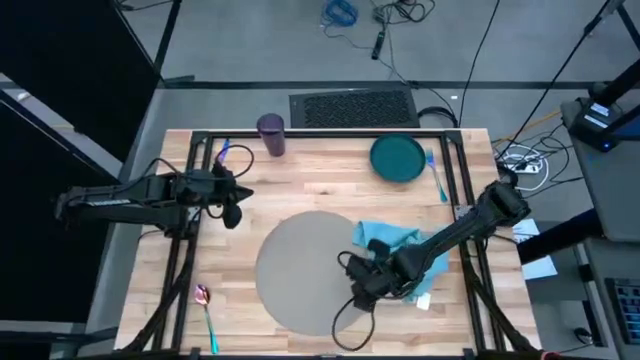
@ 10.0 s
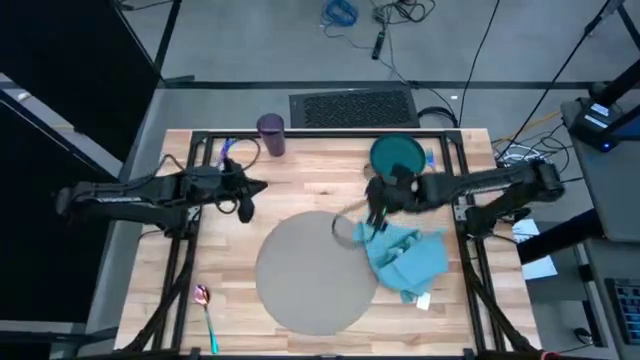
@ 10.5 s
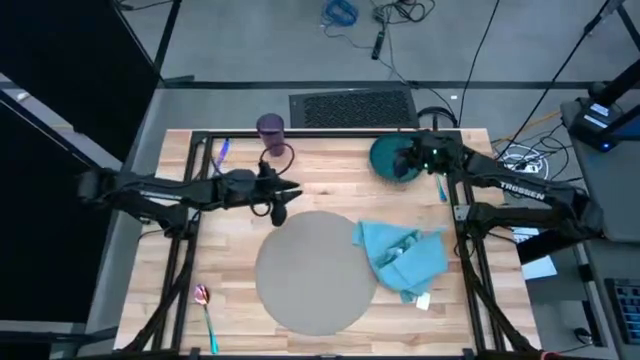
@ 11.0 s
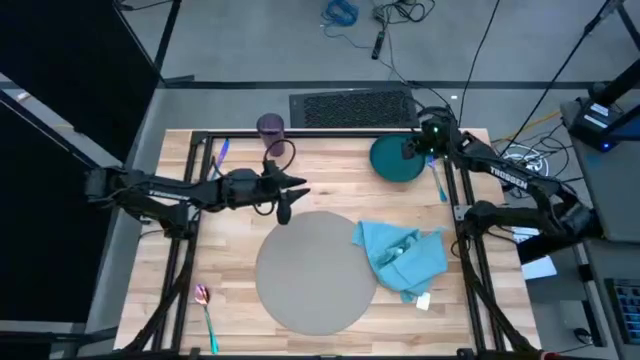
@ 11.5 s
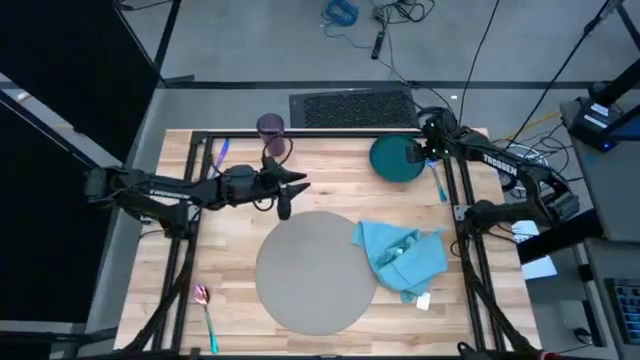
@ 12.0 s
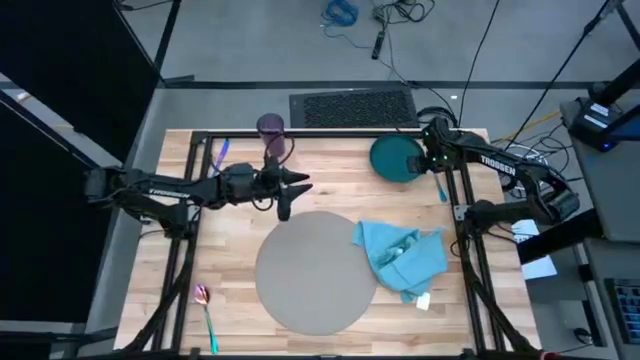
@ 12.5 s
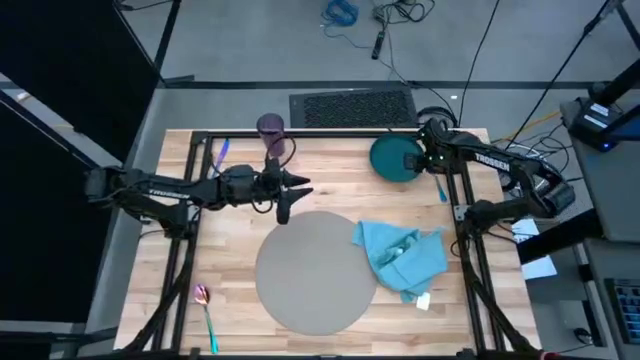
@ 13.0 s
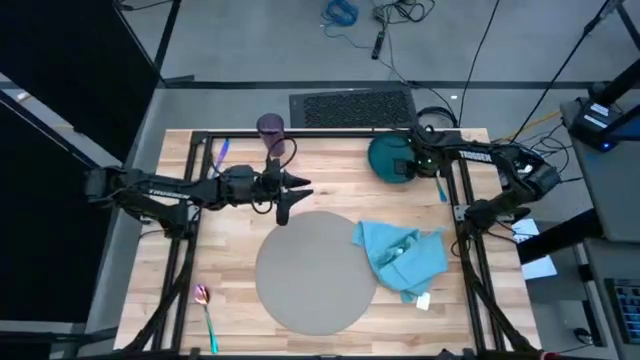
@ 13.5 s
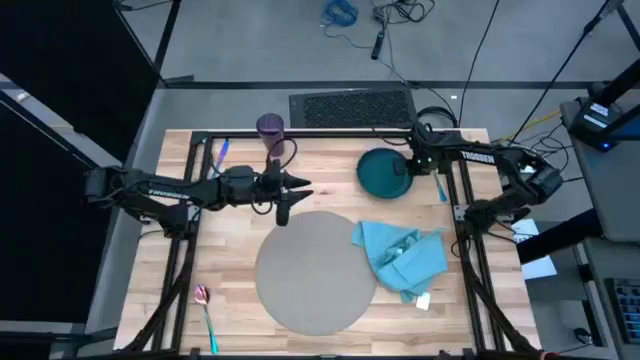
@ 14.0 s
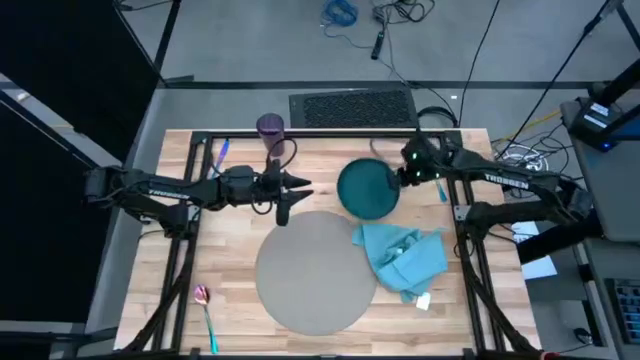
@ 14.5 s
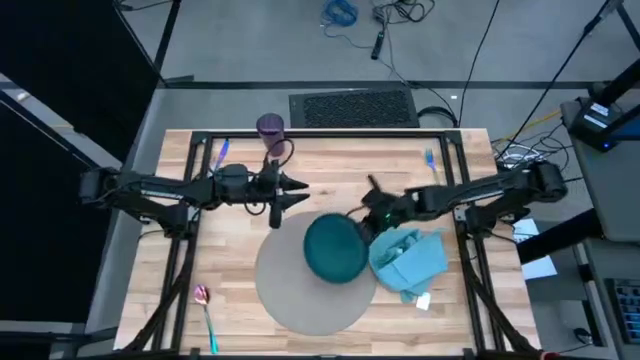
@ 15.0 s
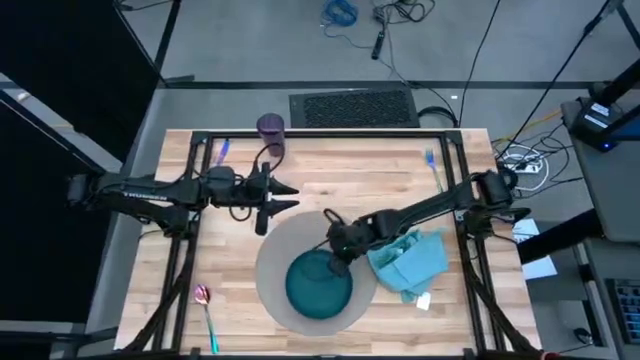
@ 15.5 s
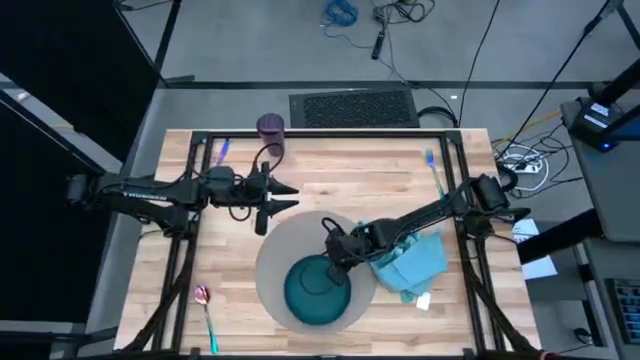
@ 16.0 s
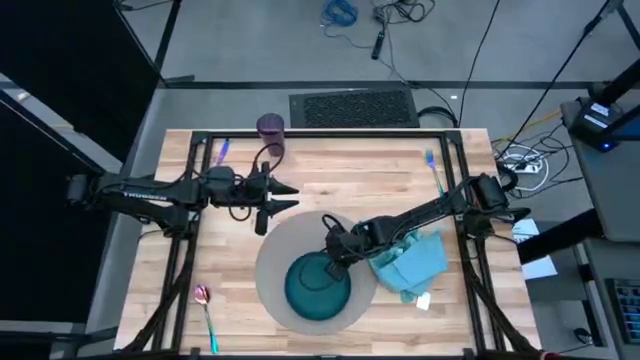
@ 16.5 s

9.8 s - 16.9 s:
Task: Set table place
Put the green plate on the gray placemat

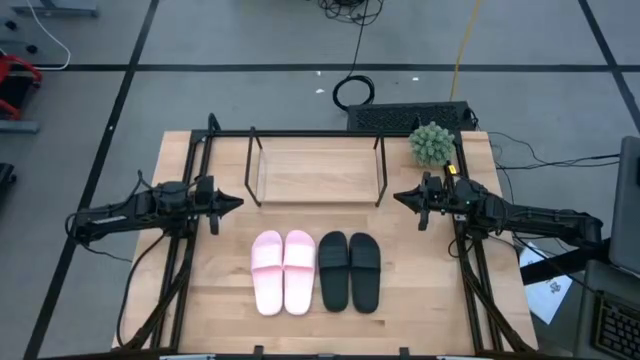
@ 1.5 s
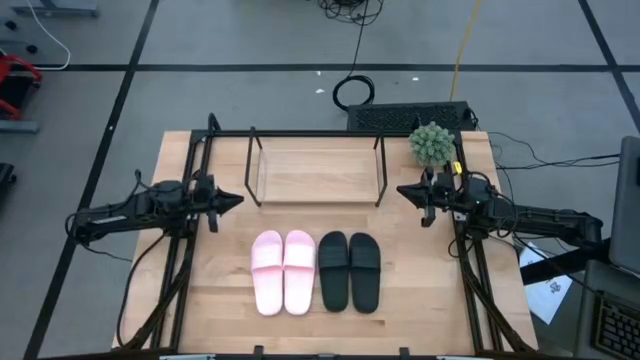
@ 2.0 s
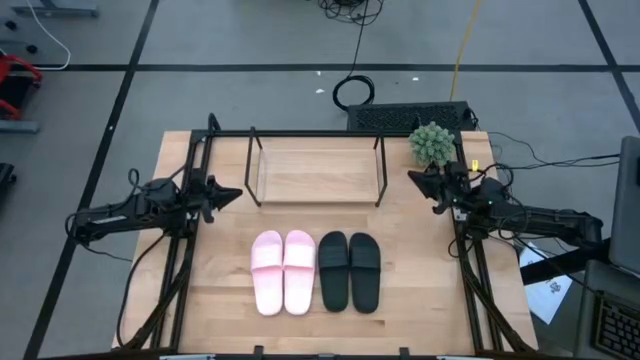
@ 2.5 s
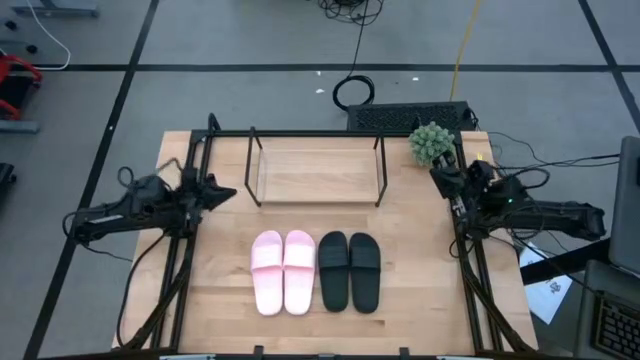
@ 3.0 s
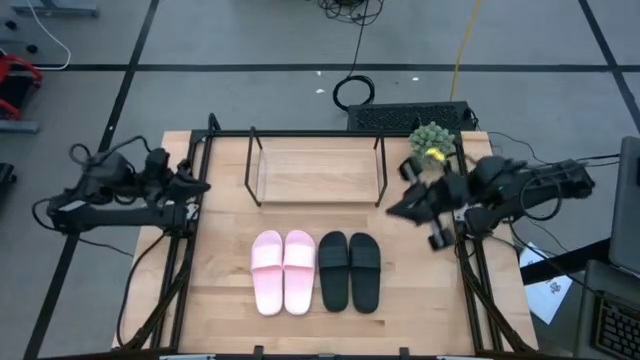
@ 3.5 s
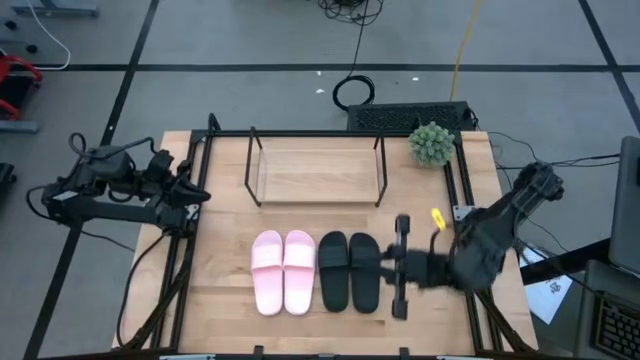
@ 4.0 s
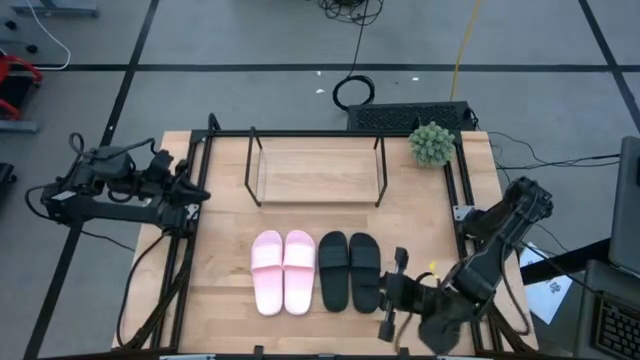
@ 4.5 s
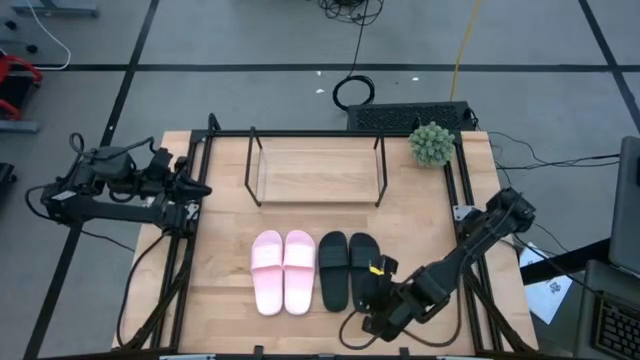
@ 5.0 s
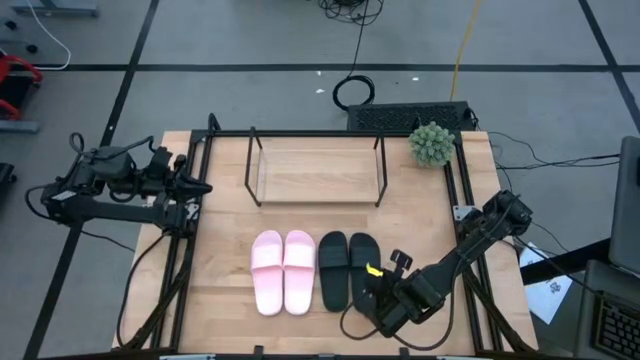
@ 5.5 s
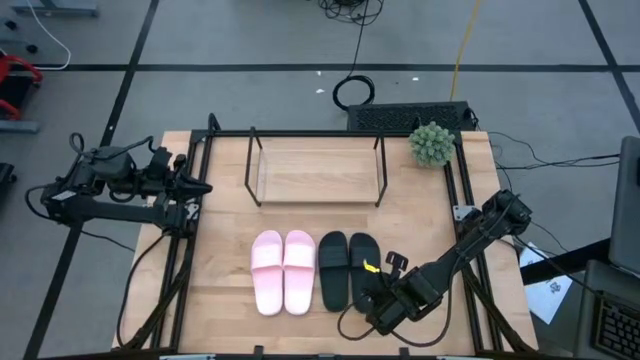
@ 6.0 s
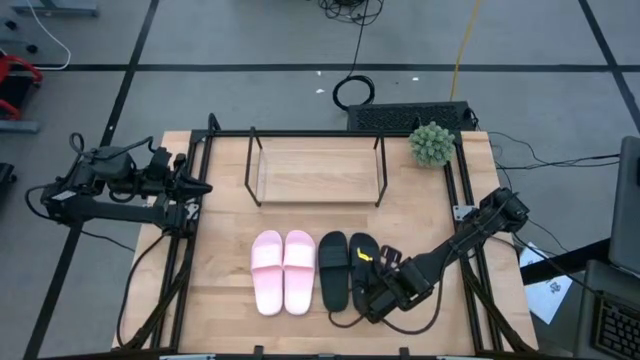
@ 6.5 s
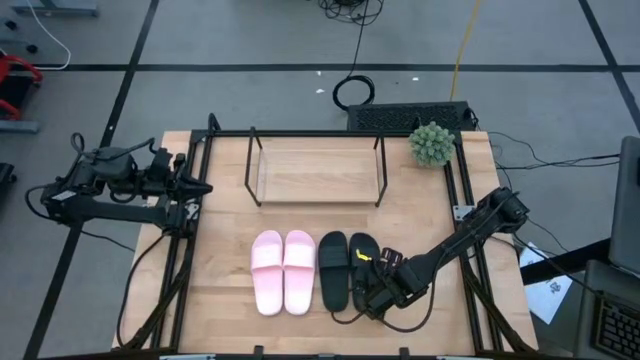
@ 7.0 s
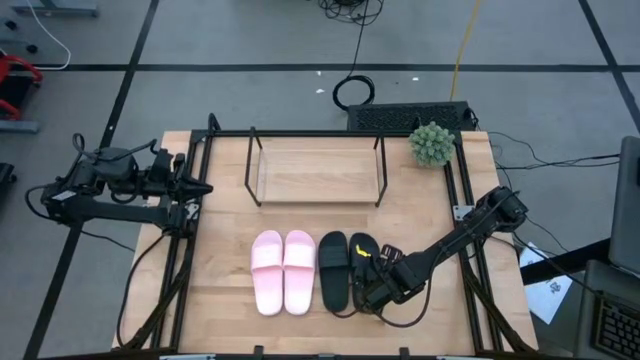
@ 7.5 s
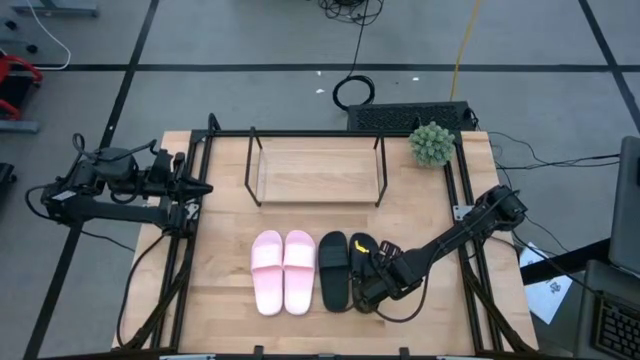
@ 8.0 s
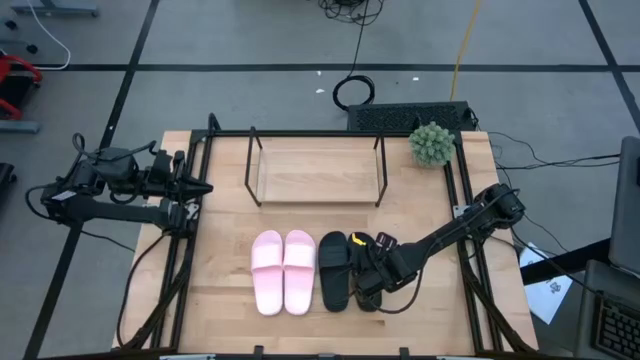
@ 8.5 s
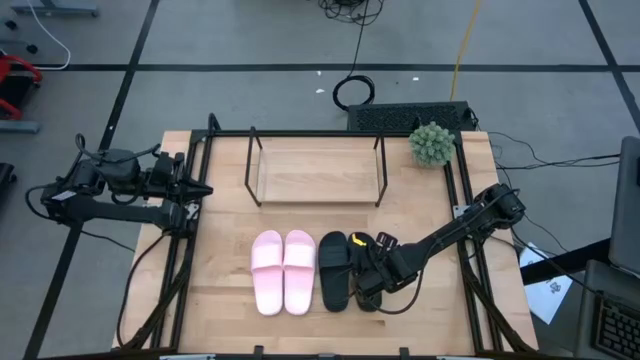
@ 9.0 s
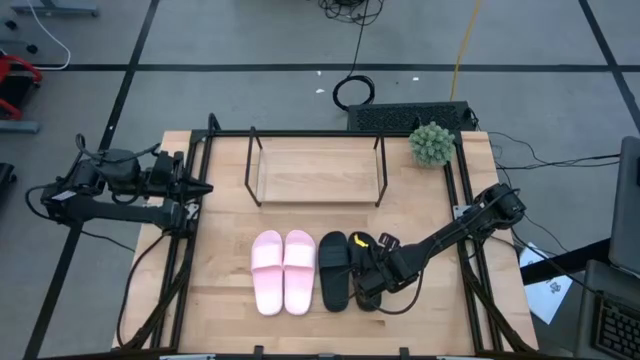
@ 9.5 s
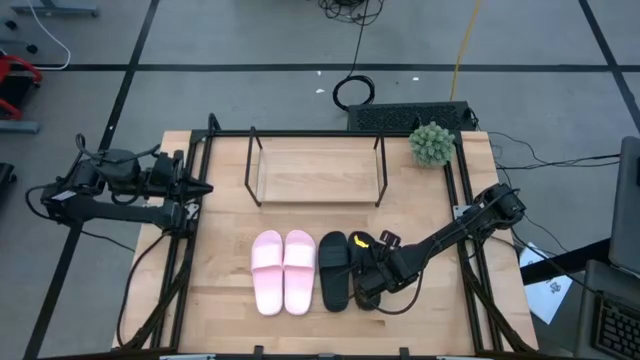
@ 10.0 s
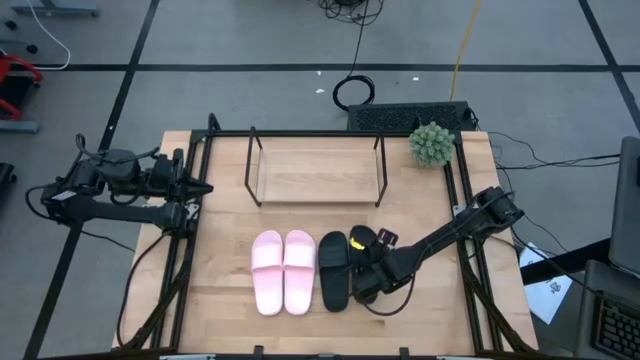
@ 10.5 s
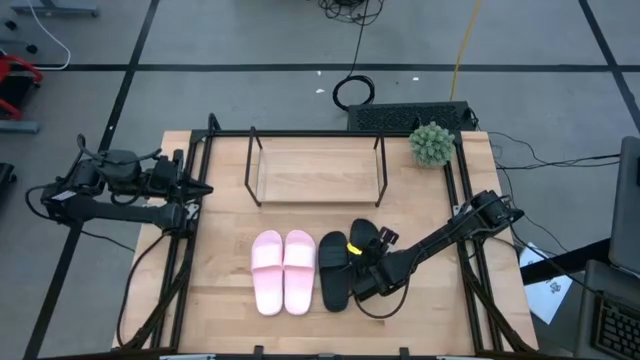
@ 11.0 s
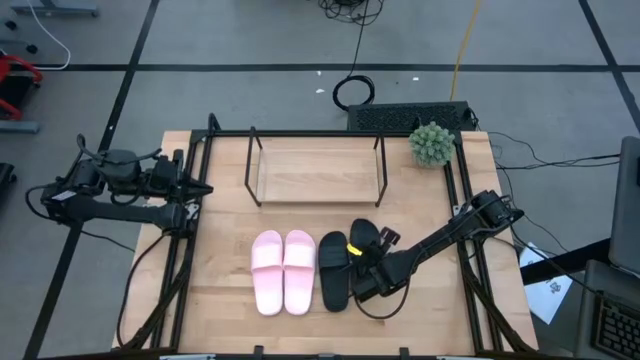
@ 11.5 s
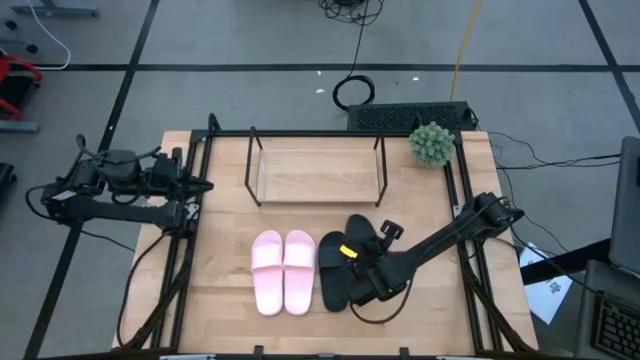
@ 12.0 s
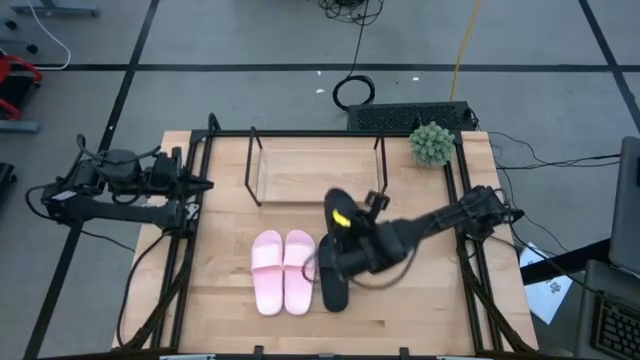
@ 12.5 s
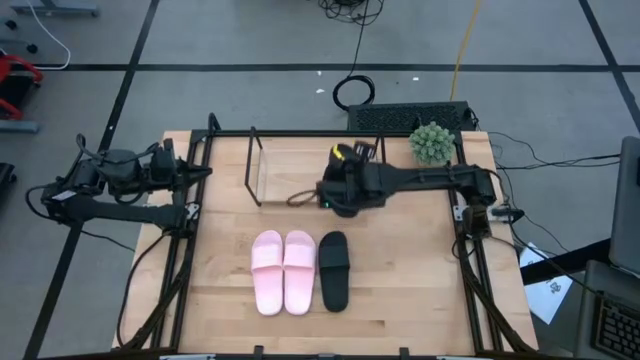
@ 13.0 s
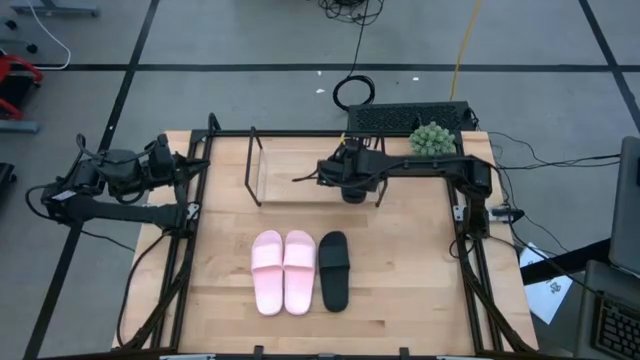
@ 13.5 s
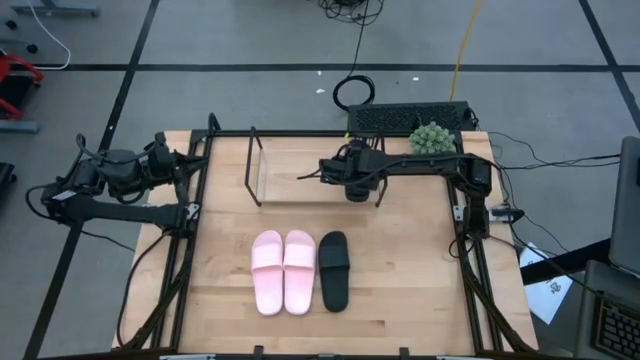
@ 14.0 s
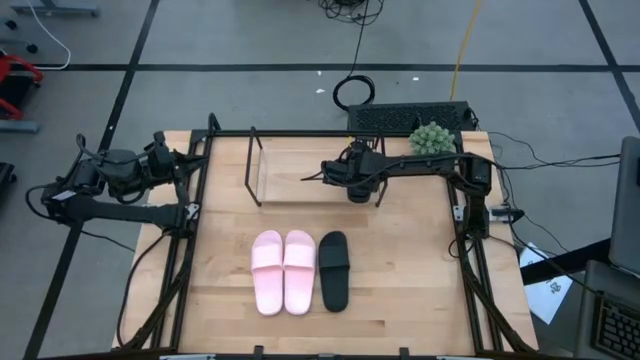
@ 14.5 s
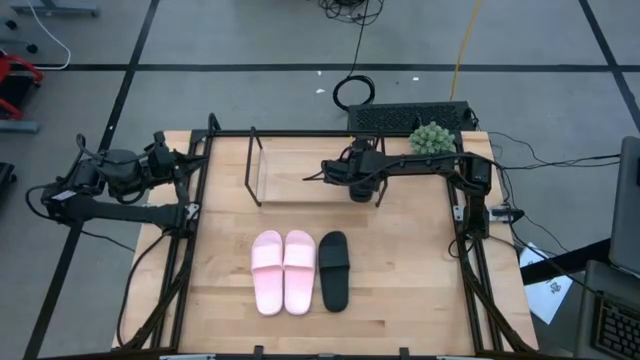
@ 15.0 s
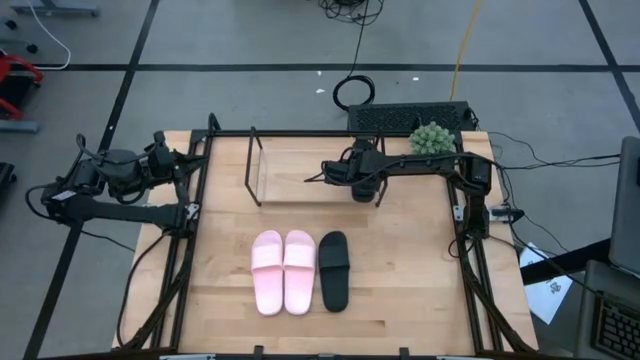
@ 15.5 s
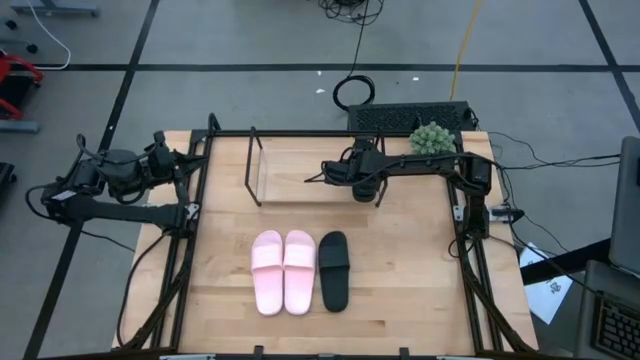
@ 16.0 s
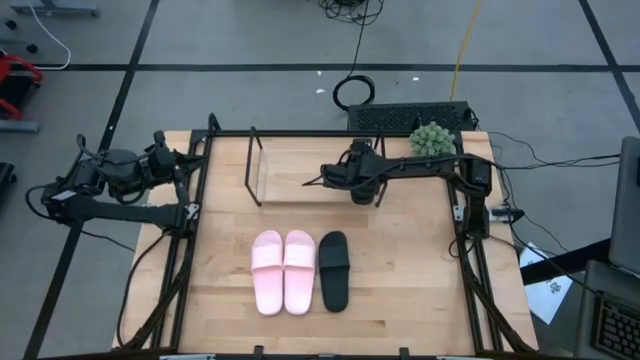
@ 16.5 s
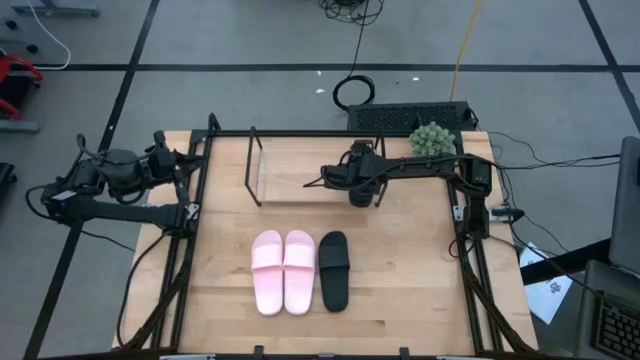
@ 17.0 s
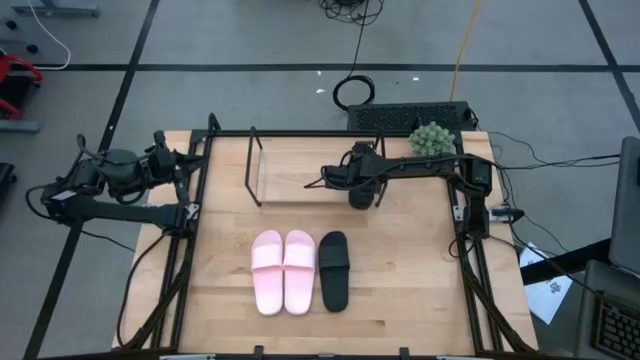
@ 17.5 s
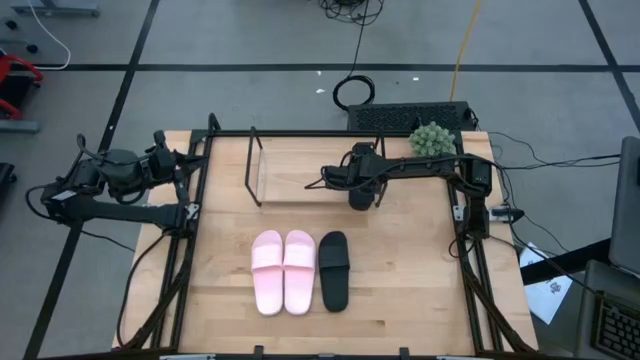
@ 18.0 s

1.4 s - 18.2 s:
Task: Pick and place slides into the shelf
Put the right black slide on the shelf
